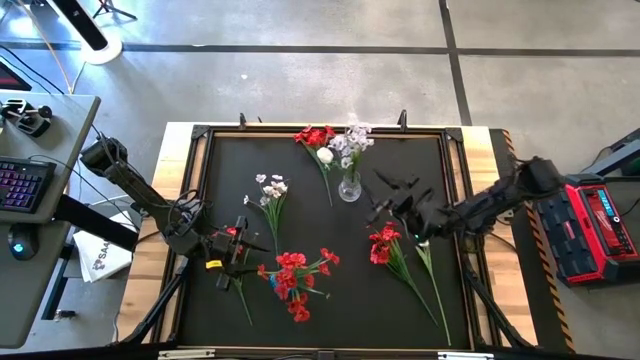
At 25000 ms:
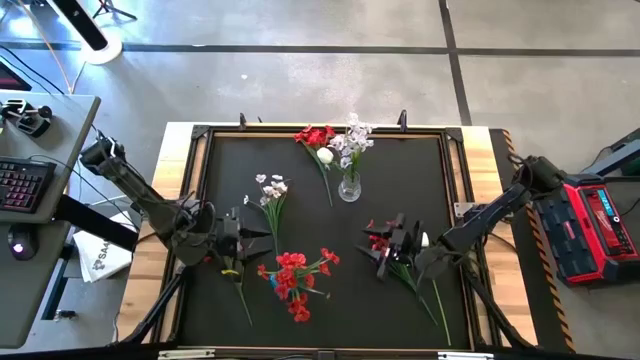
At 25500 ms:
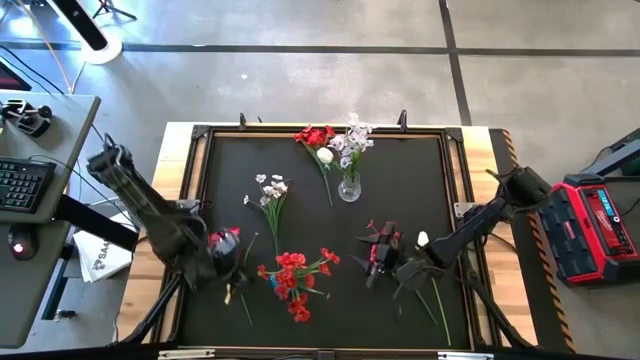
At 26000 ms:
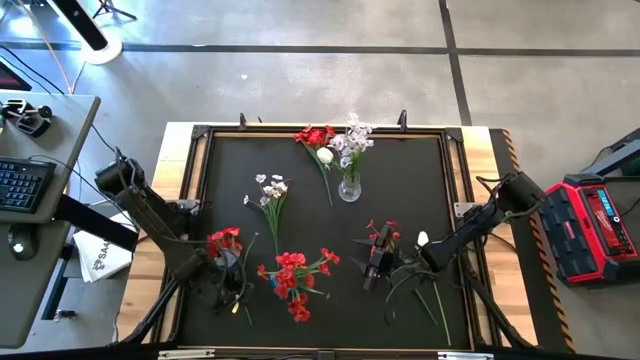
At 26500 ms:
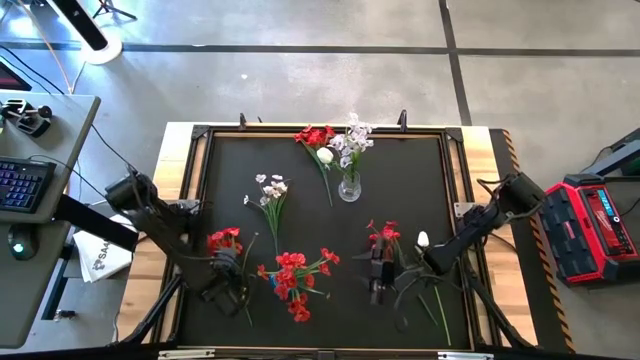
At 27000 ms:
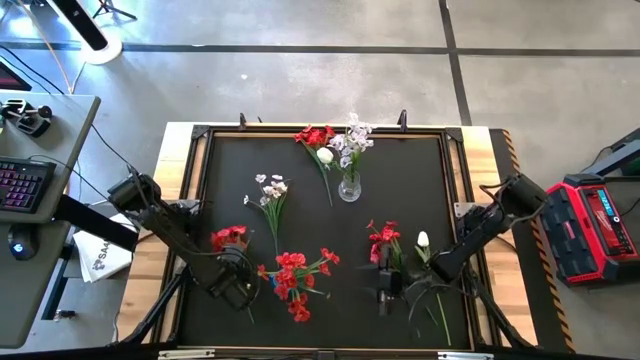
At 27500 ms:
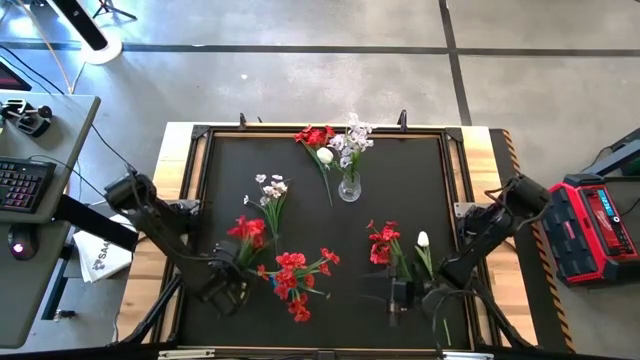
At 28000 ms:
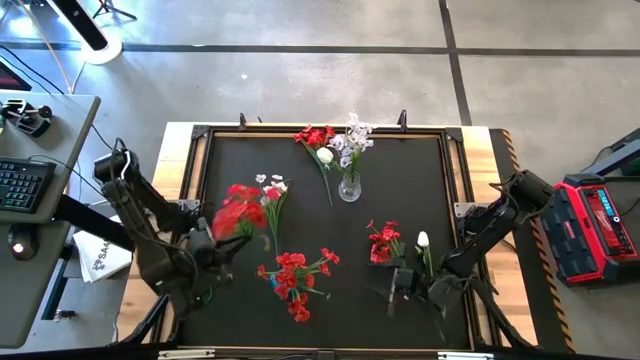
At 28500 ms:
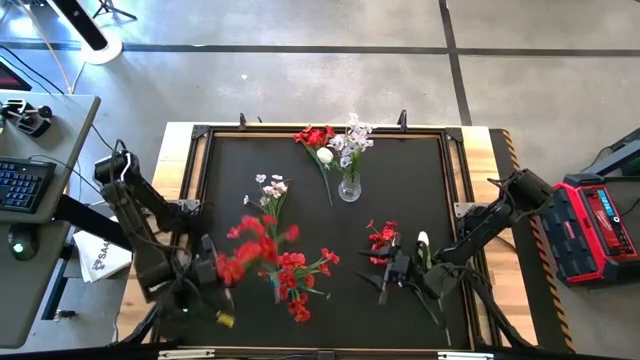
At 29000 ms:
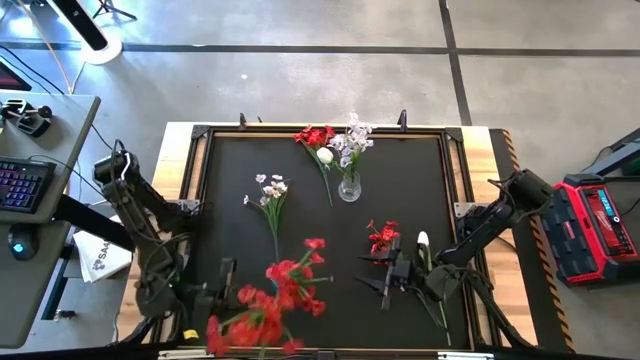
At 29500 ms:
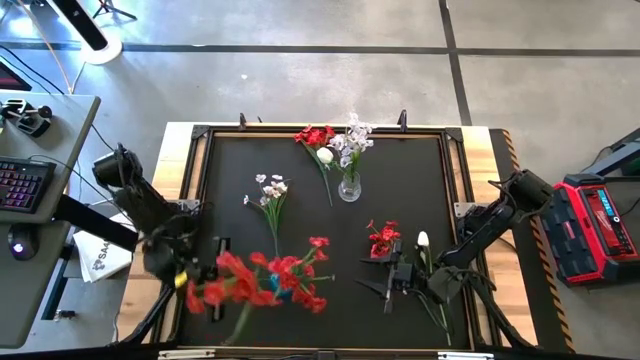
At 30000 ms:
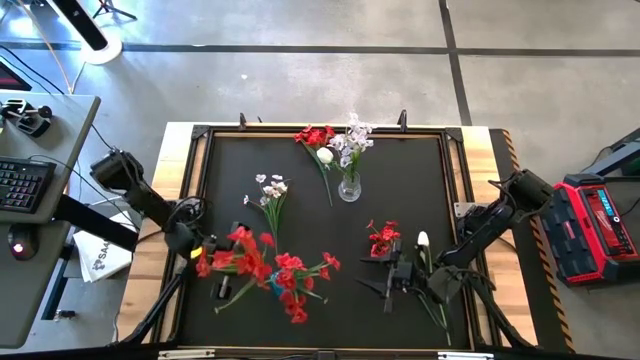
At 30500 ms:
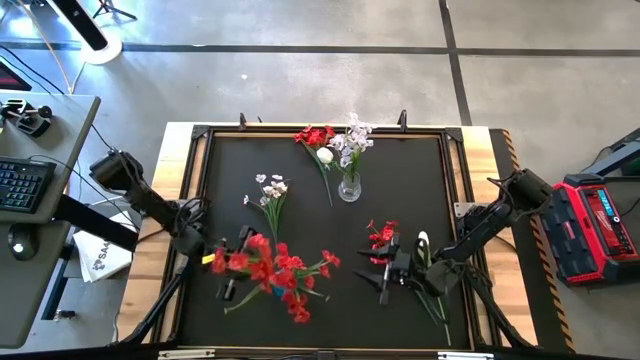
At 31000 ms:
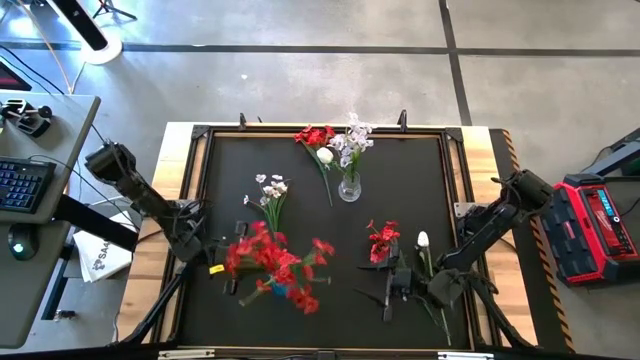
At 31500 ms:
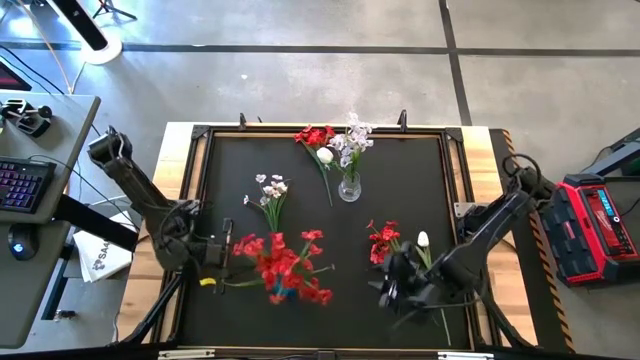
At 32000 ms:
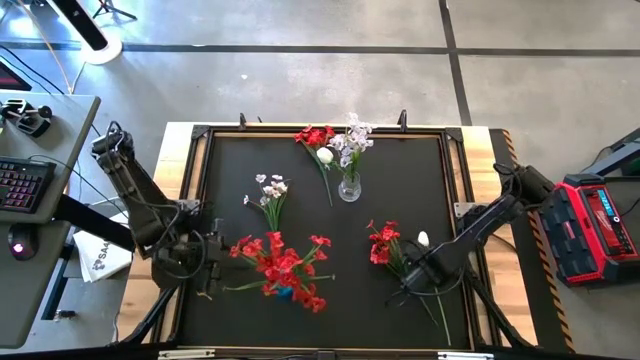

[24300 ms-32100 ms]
Task: Sort flowers into vase by color
Put the red flowers into the blue vase

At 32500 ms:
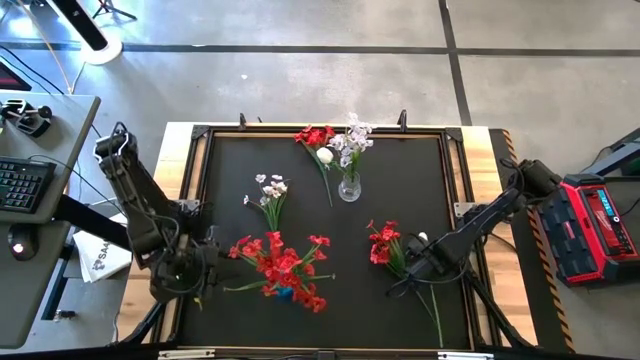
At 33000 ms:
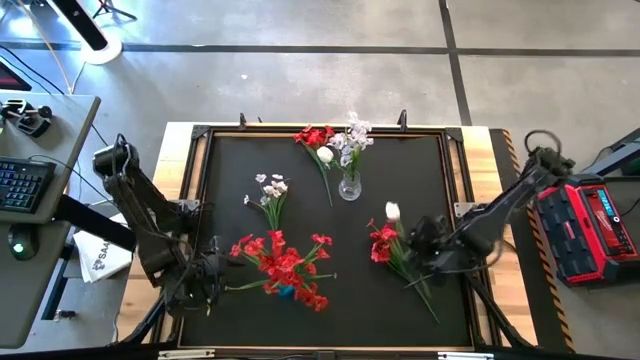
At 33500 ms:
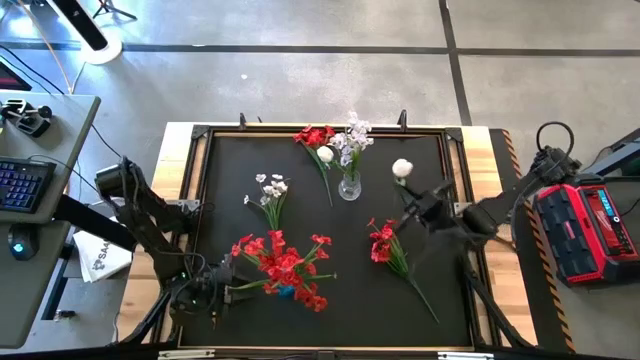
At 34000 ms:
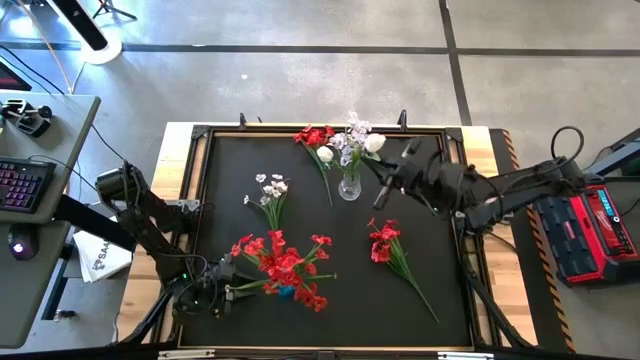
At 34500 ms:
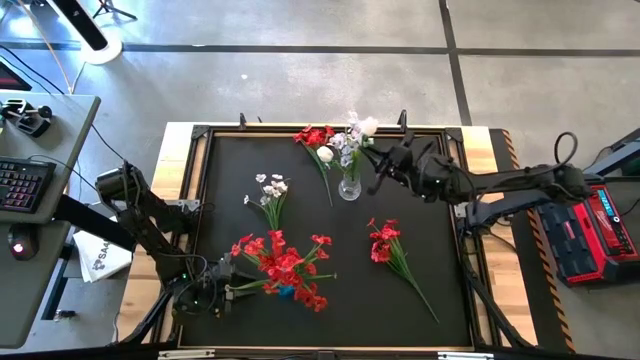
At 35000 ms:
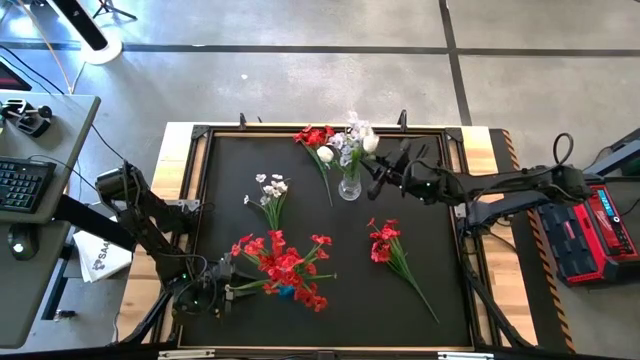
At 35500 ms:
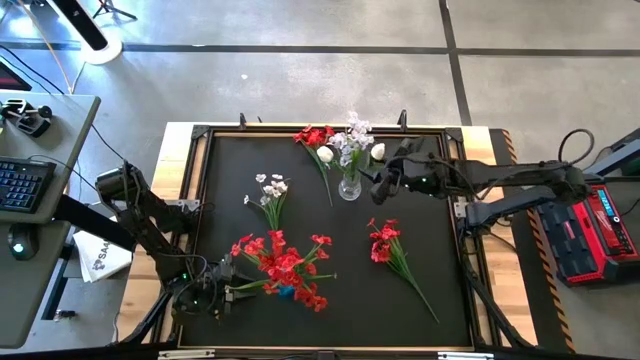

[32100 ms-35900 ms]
Put the white tulip into the transparent vase

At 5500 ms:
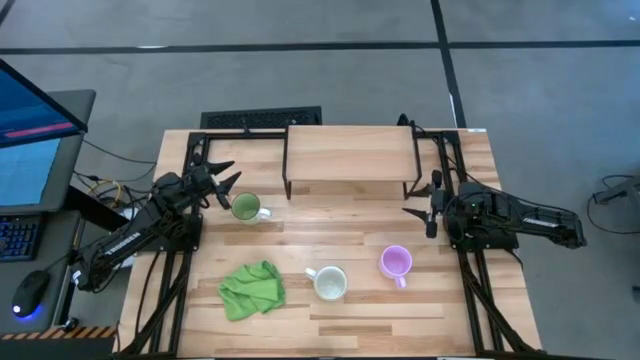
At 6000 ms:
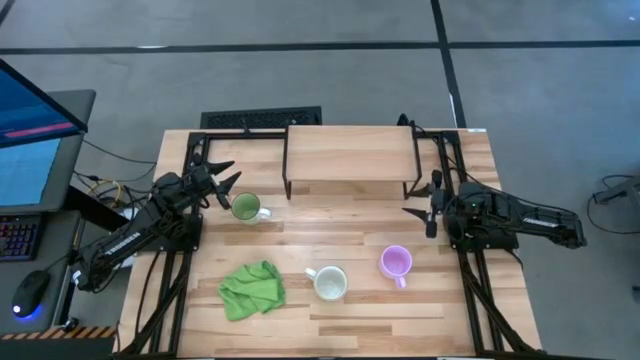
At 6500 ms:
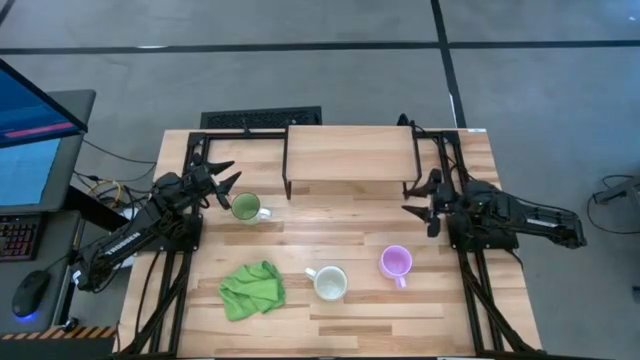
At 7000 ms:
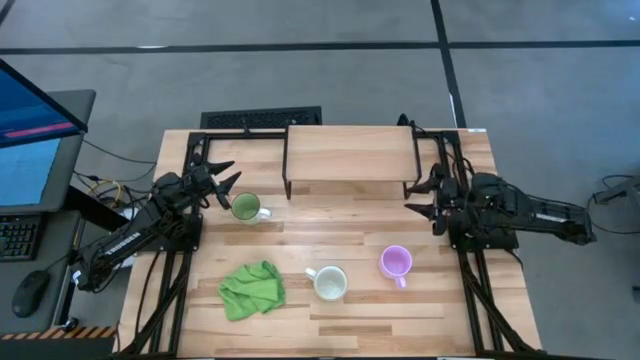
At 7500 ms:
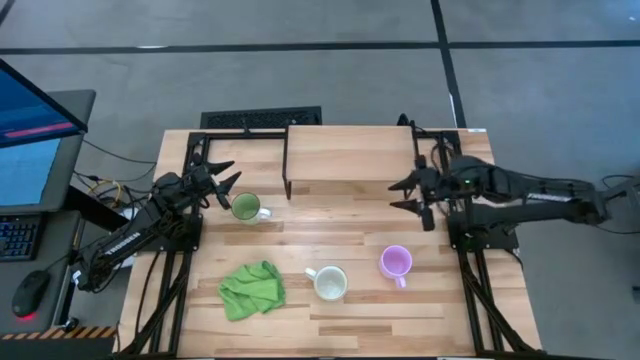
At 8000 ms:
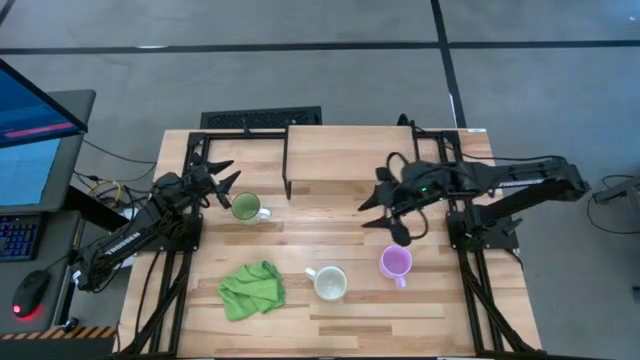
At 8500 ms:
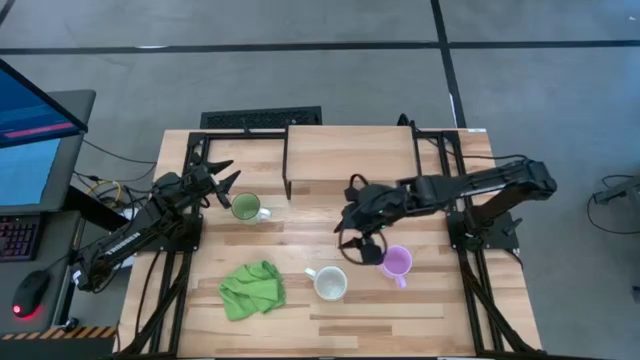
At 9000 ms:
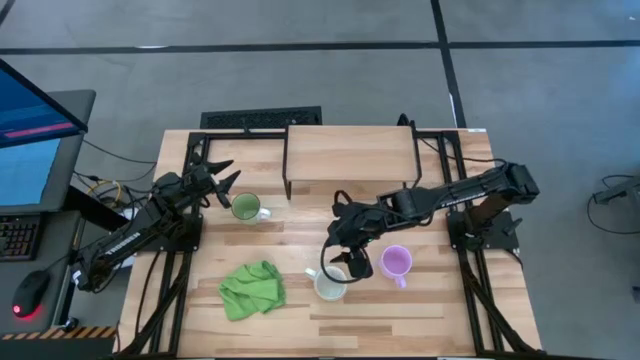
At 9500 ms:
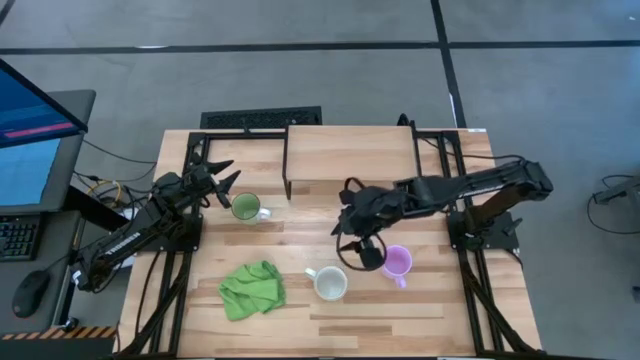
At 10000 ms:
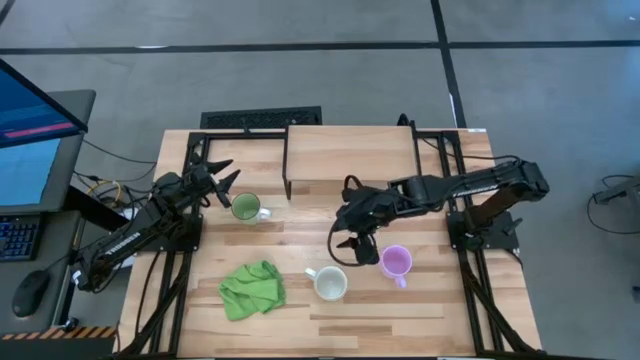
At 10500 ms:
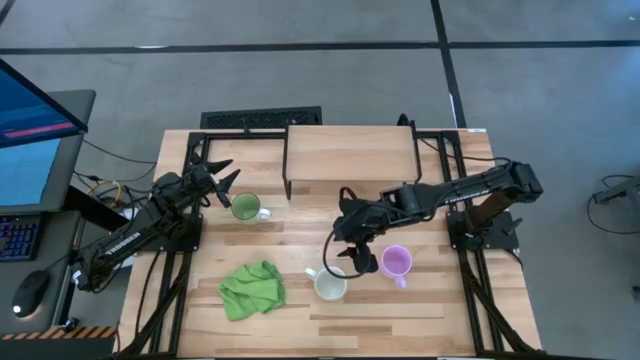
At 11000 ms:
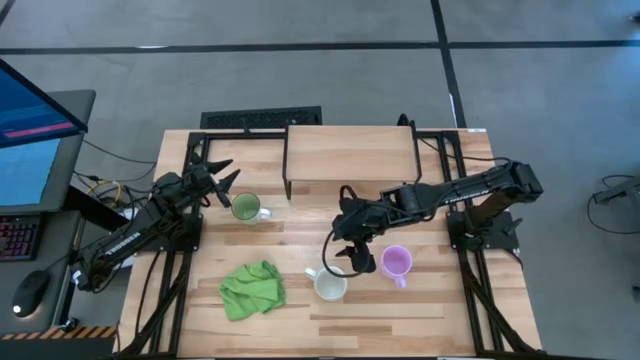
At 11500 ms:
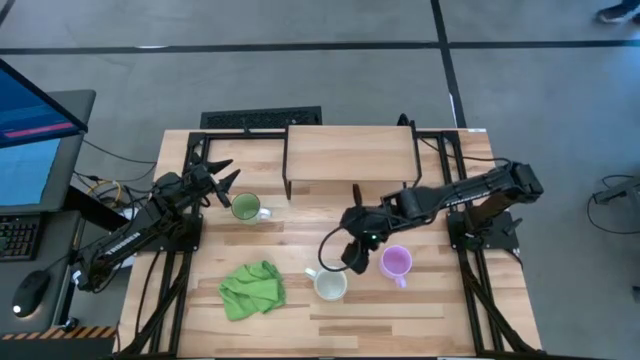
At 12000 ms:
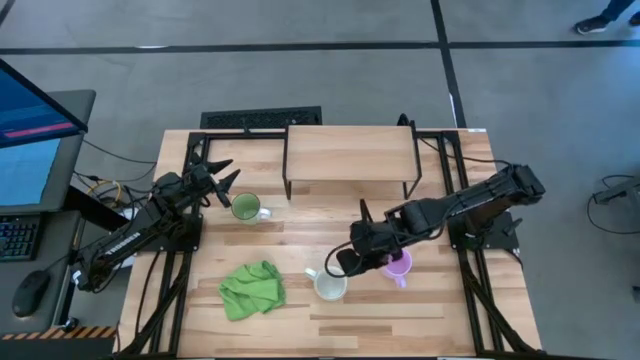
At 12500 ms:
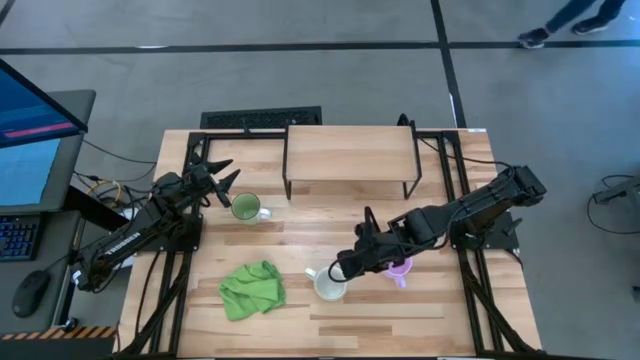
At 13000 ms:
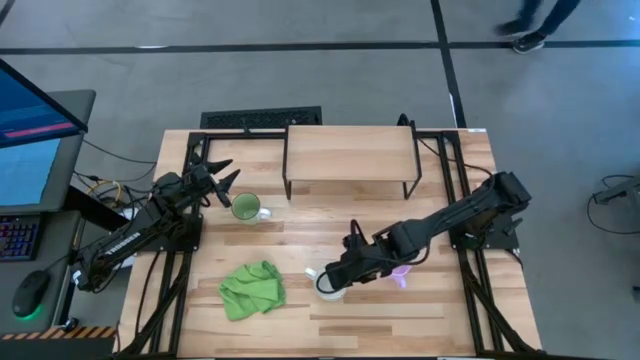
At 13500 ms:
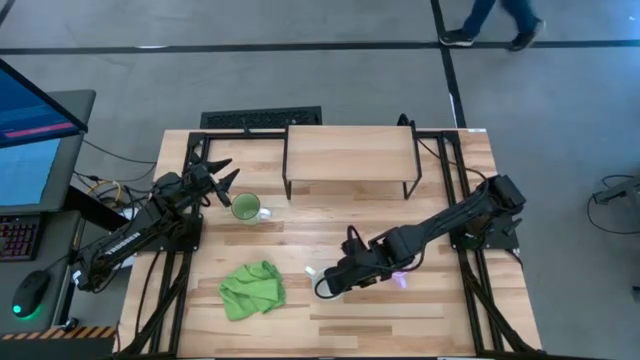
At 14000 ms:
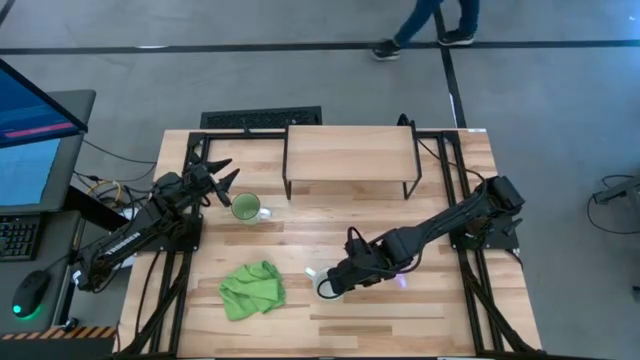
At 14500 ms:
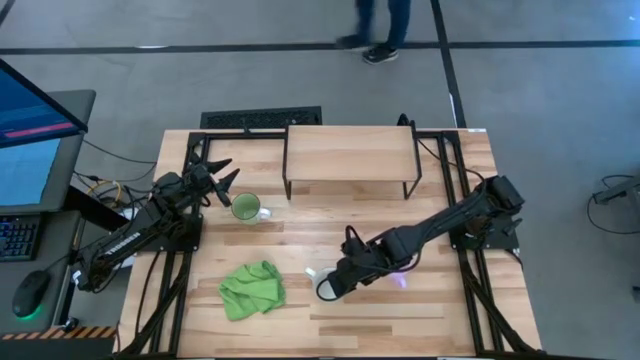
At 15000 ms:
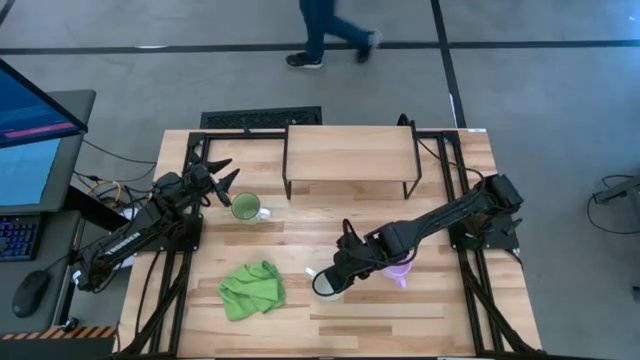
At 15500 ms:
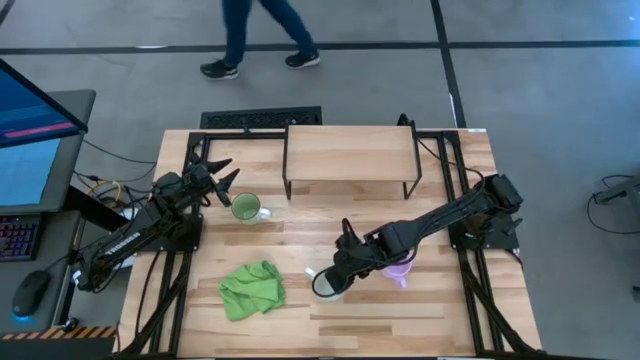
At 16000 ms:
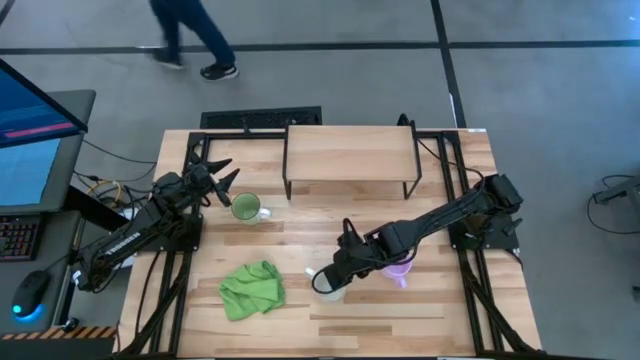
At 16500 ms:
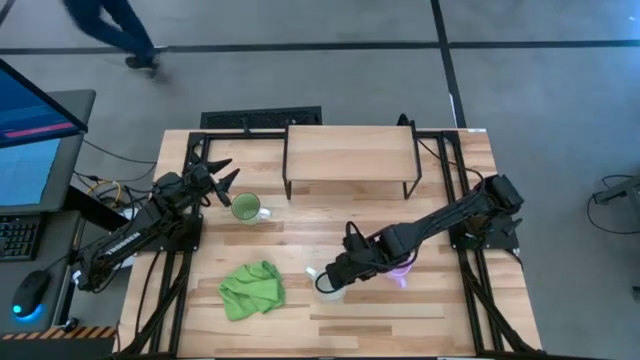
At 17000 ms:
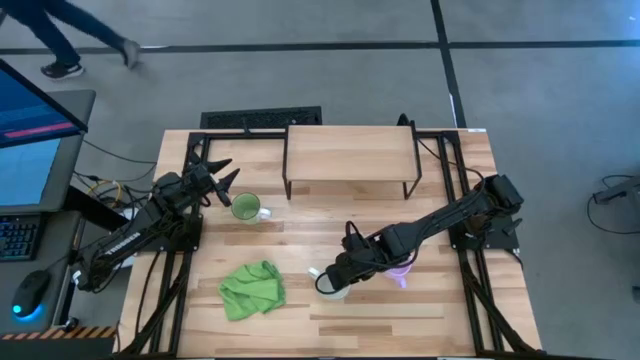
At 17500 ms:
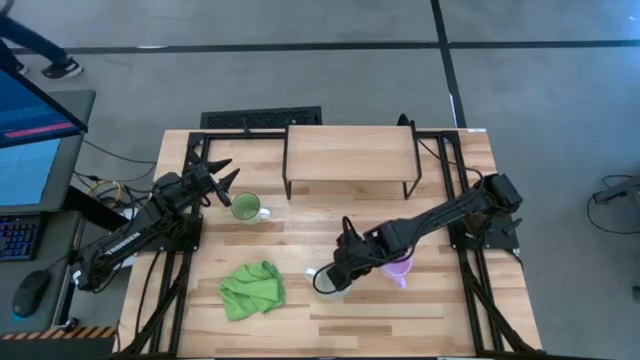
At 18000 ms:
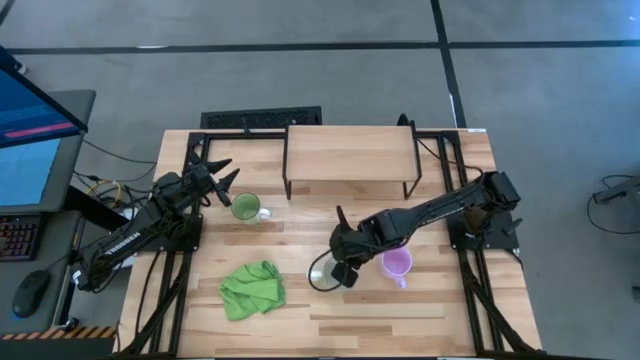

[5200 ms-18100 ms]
Task: Stack small to large cups/mugs on shelf
Put the yellow mug on the shelf
